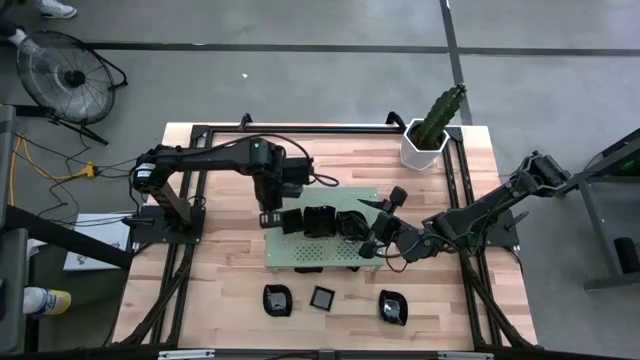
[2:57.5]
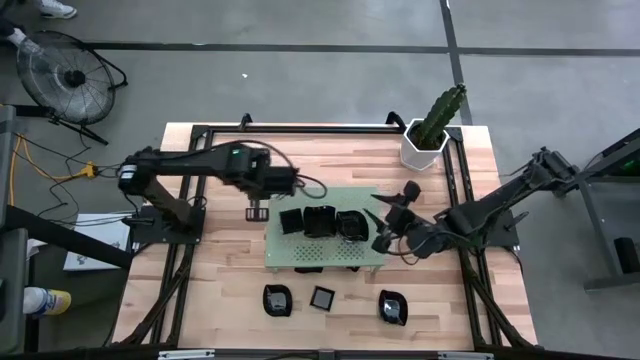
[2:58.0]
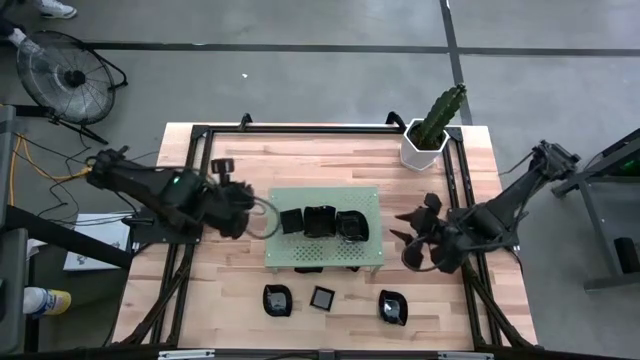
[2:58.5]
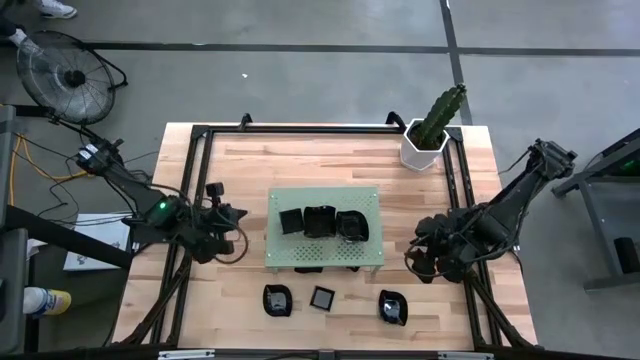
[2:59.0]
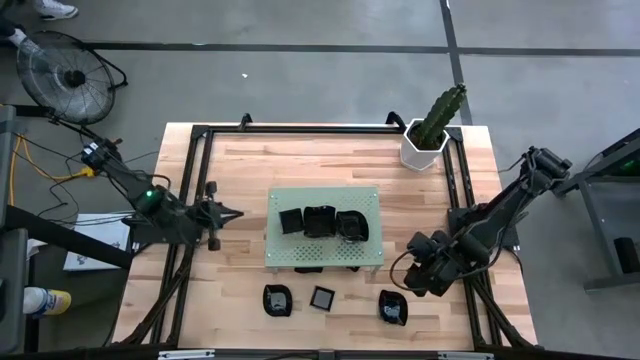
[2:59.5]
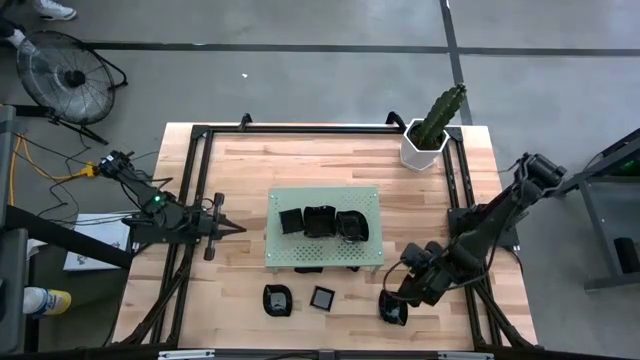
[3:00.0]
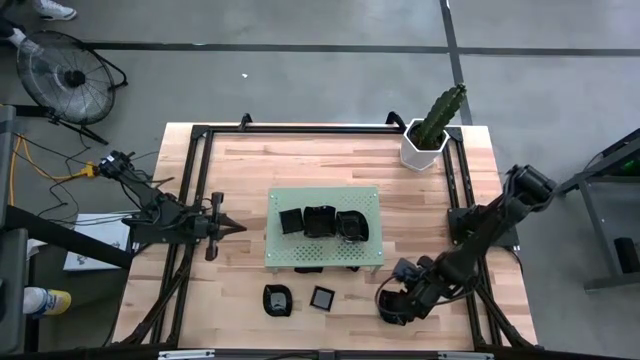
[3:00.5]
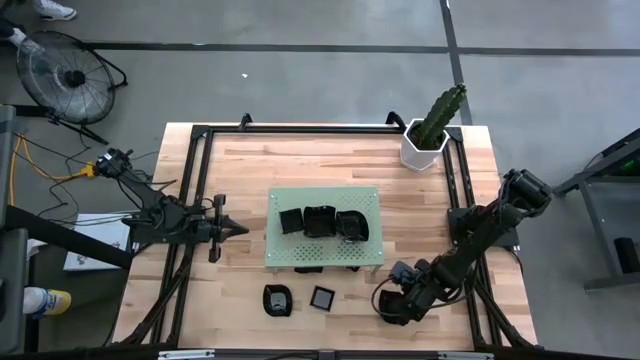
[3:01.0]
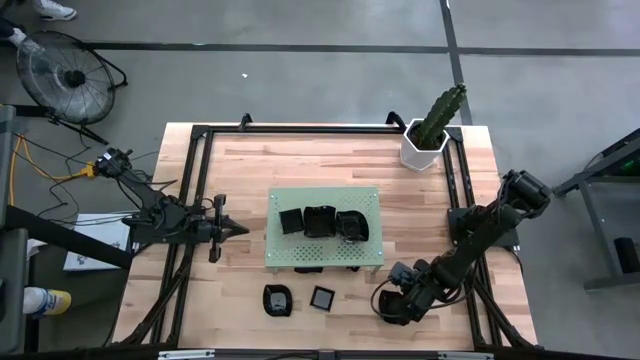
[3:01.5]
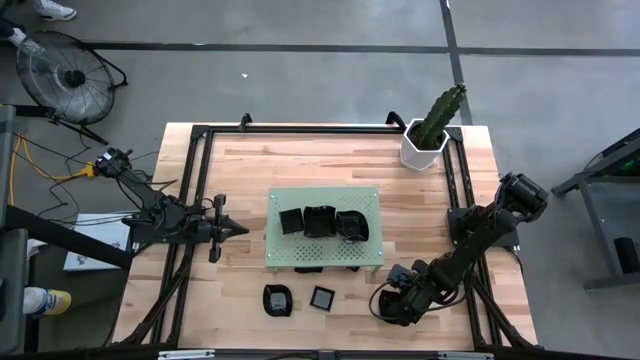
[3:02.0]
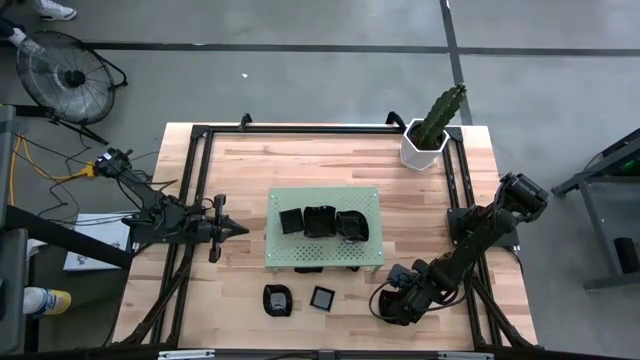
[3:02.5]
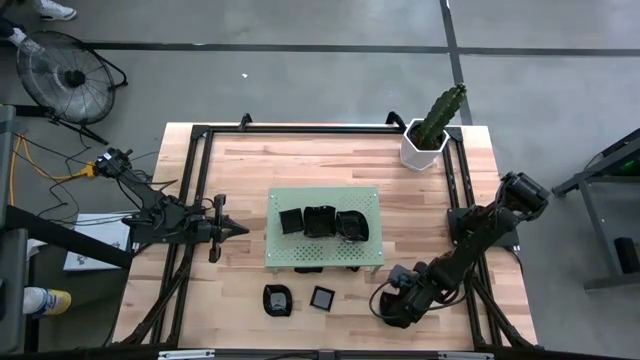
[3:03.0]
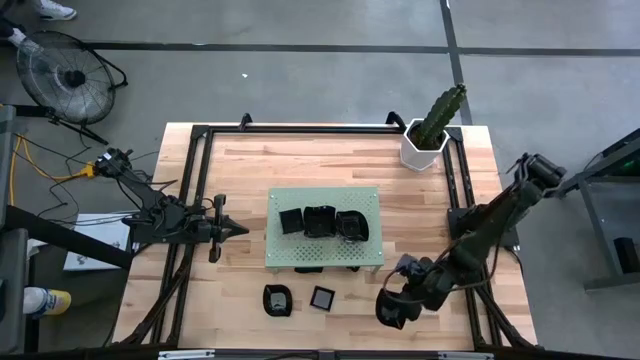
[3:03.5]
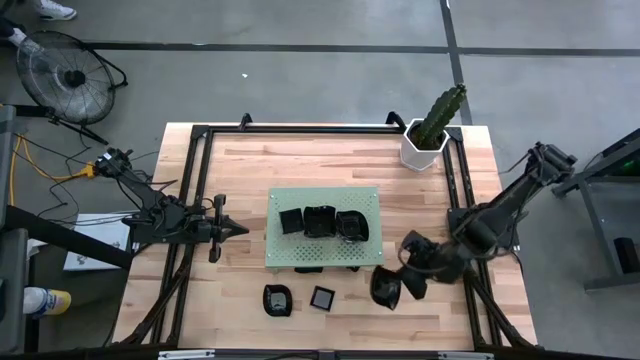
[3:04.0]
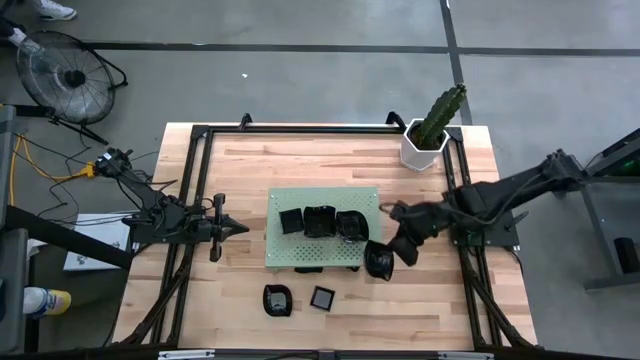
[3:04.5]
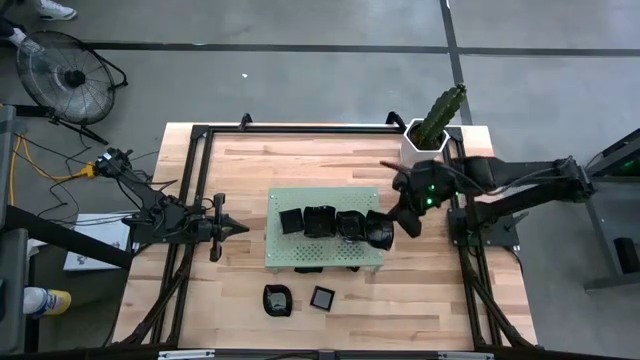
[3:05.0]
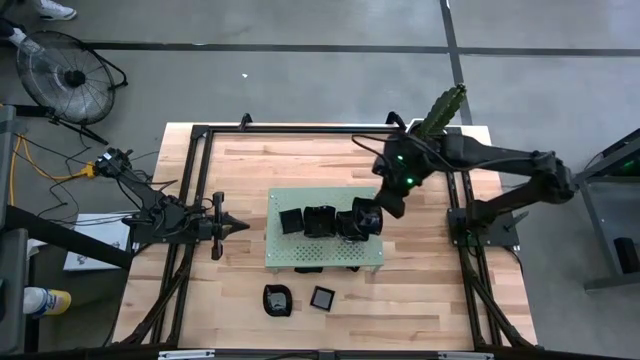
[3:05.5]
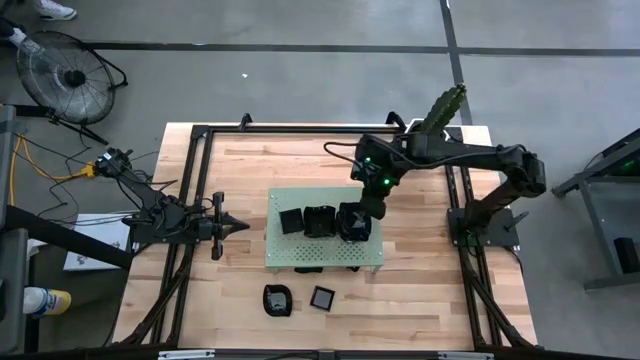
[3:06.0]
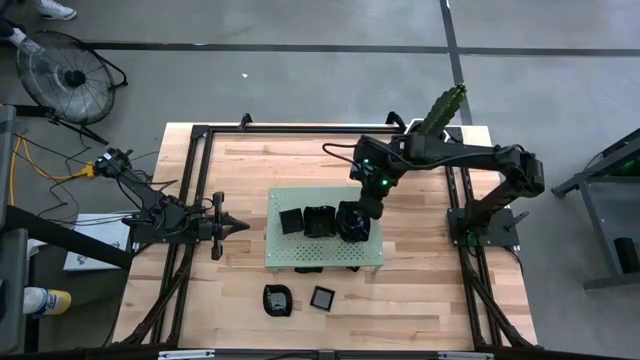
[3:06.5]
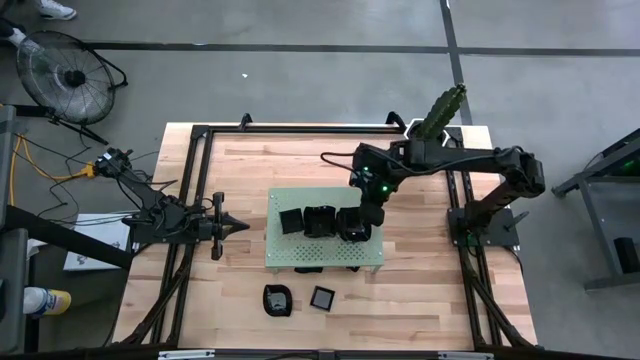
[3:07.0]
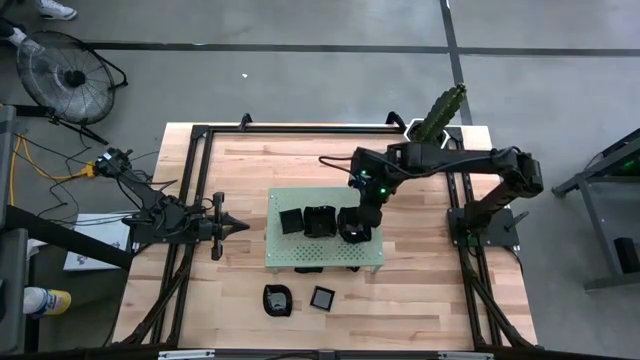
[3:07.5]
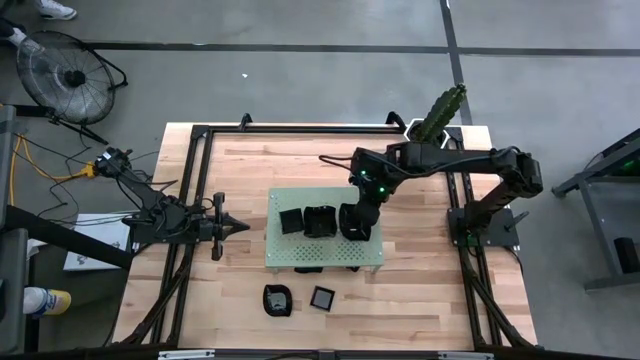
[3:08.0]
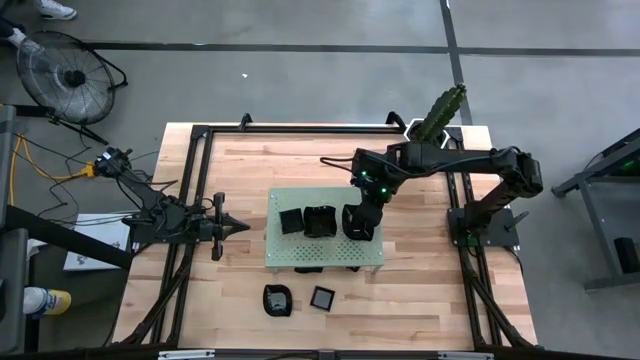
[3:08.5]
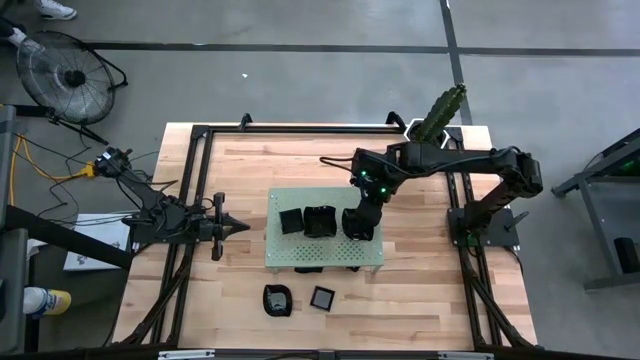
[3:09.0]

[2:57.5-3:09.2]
Task: Pick & Place Mini shaped plates
Stack the black leaf shaped bowl on top of the black leaf shaped bowl on the shelf

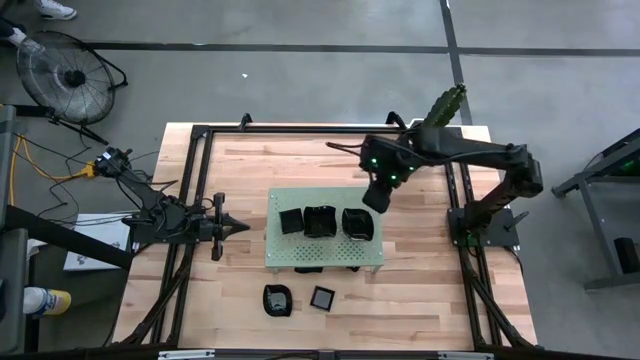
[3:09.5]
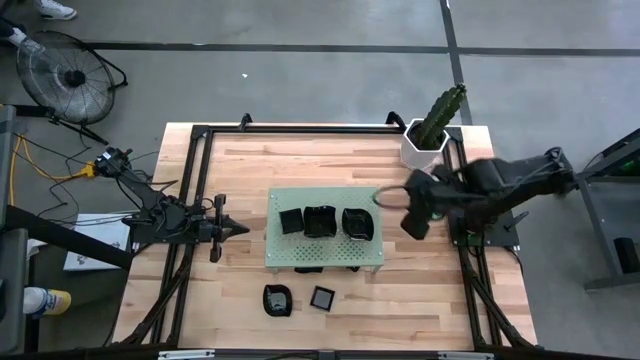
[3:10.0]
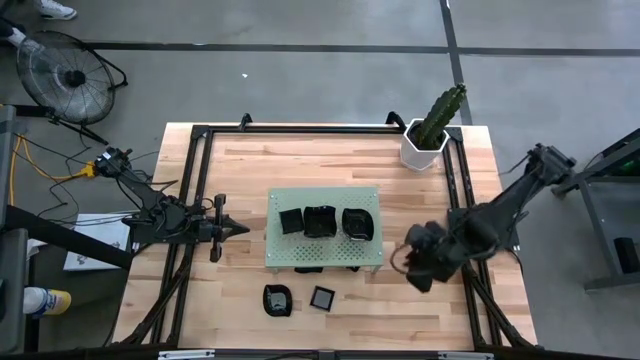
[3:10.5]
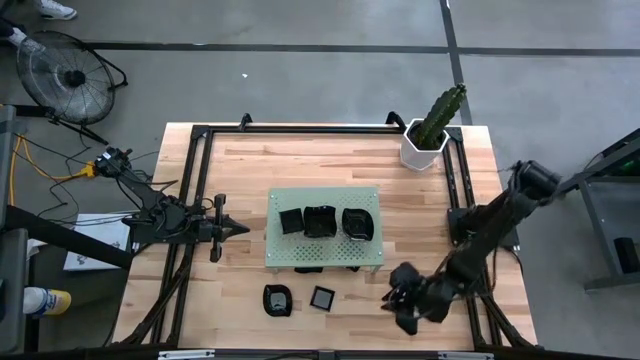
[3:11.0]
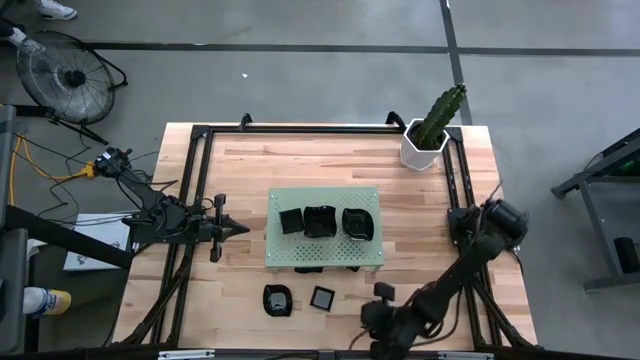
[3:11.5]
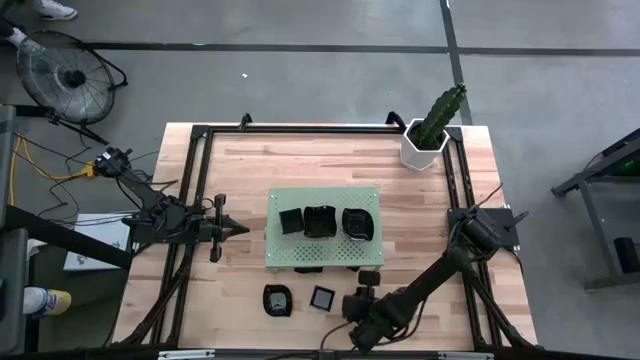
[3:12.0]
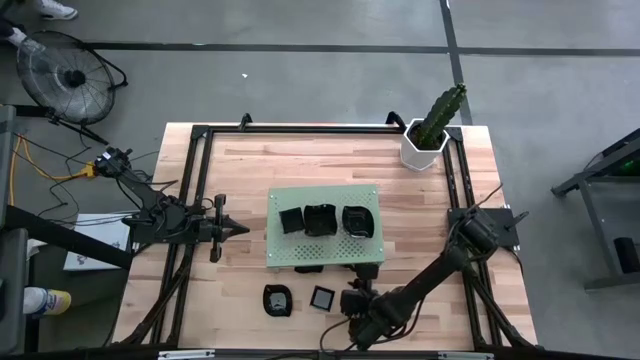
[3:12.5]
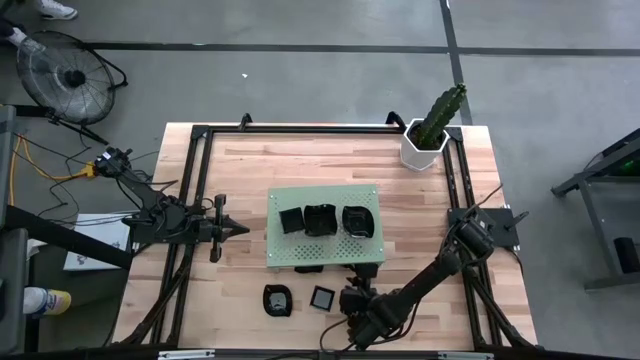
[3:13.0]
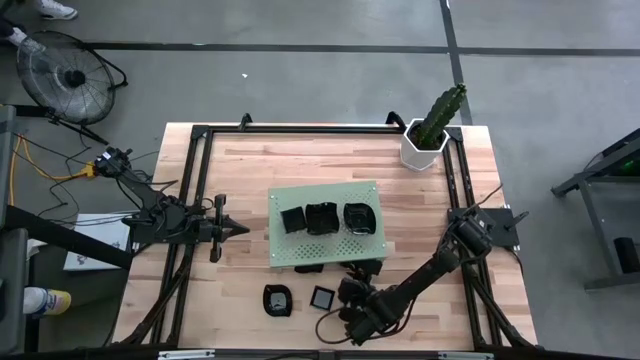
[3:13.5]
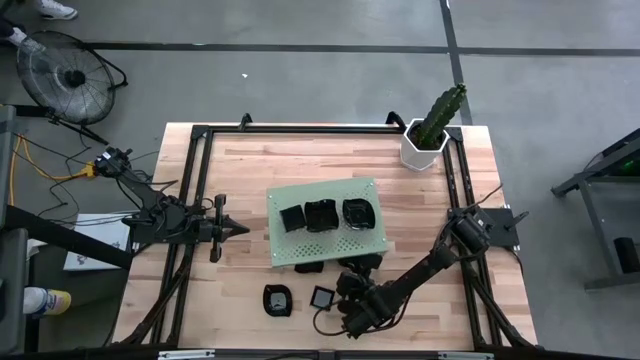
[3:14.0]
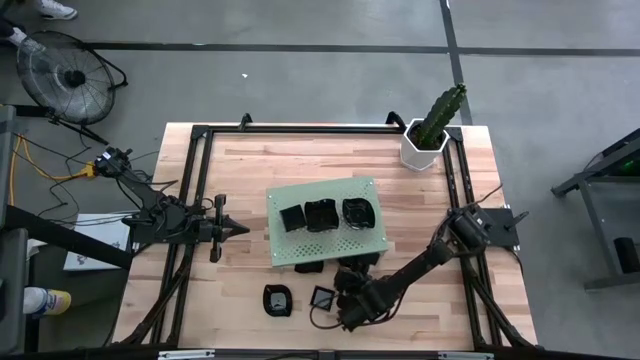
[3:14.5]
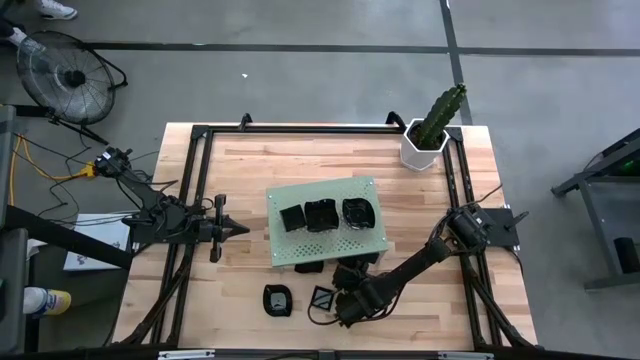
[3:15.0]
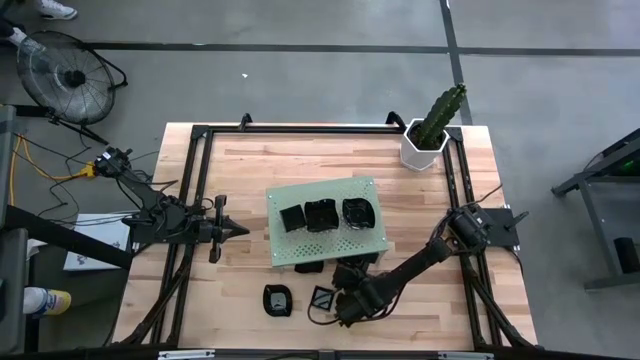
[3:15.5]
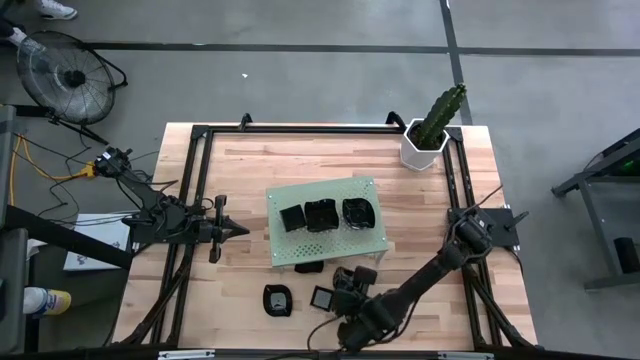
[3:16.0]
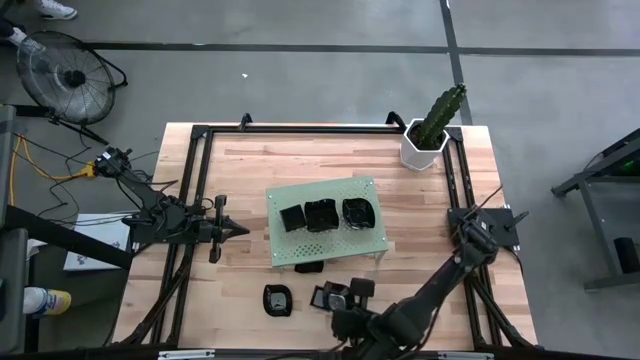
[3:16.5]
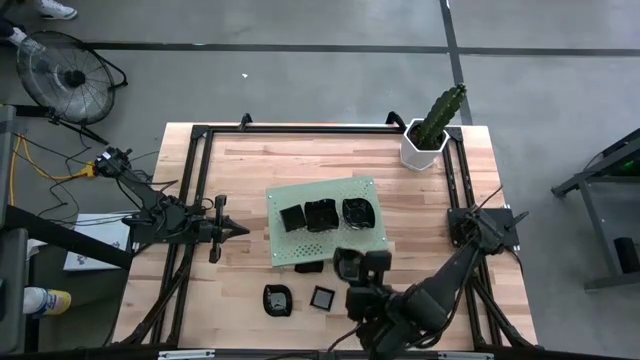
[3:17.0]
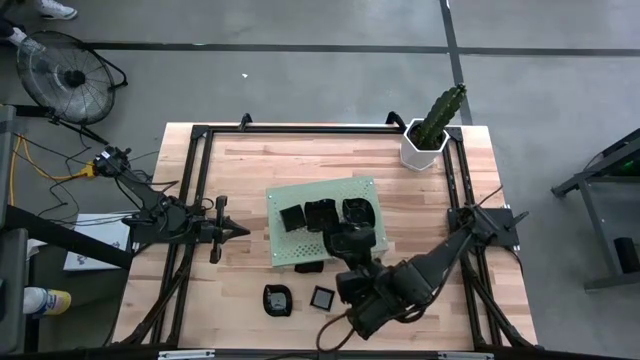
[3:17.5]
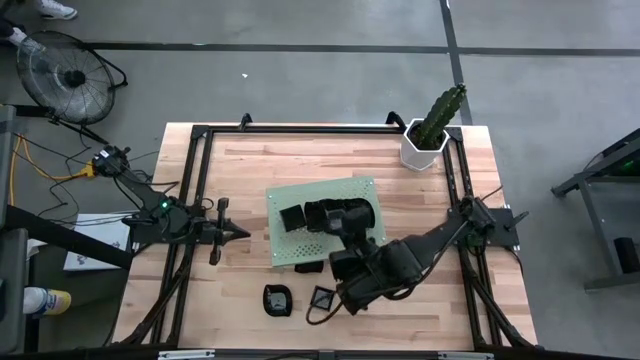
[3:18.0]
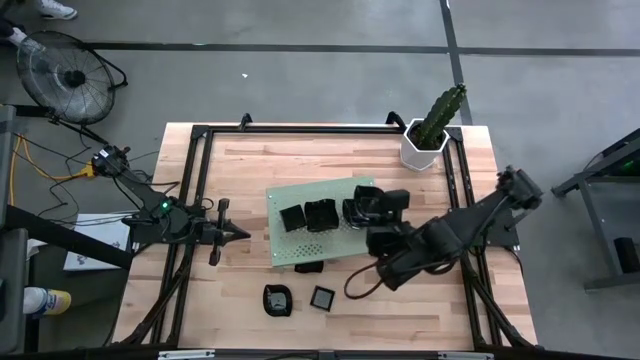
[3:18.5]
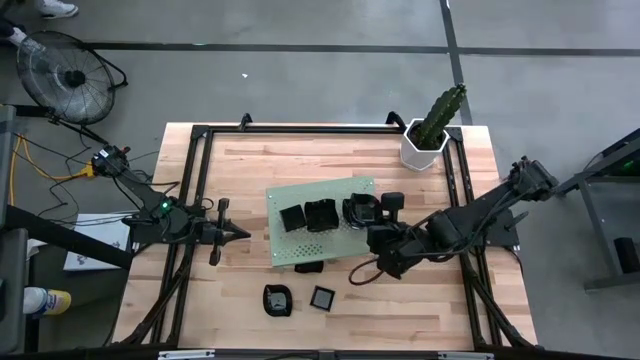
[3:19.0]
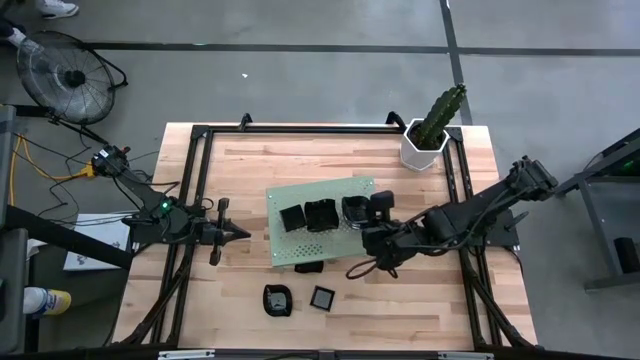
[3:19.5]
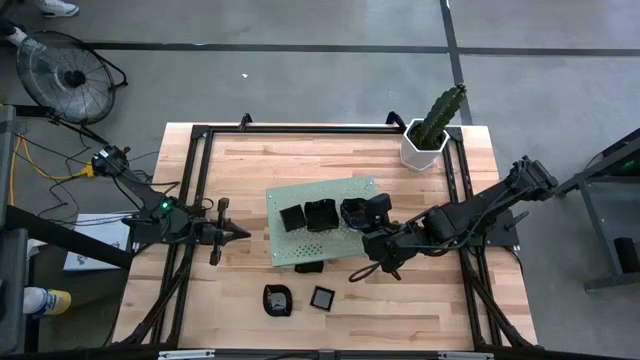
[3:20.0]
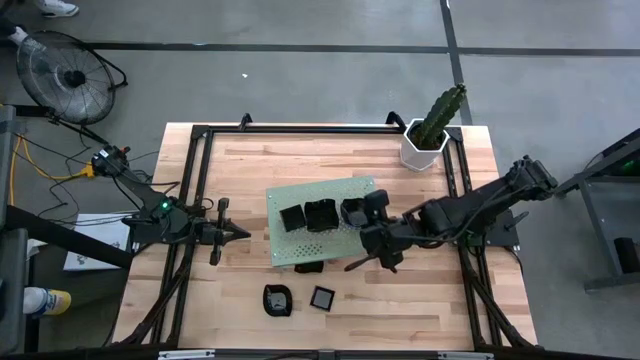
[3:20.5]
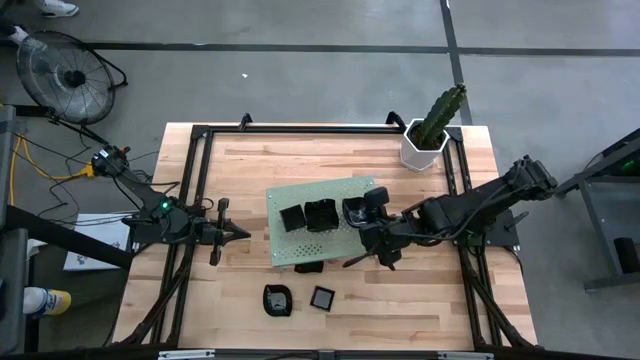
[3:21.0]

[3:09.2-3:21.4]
Stack the black leaf shaped bowl on top of the black leaf shaped bowl on the shelf
